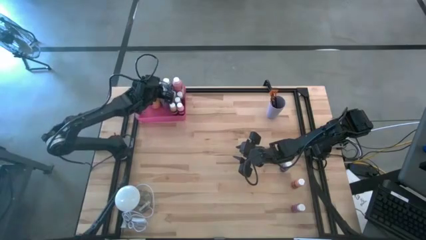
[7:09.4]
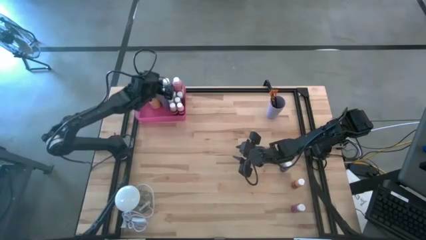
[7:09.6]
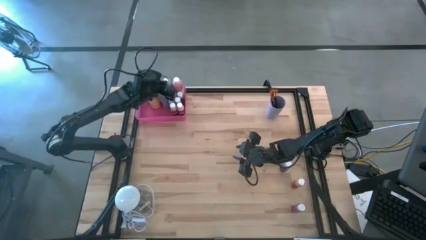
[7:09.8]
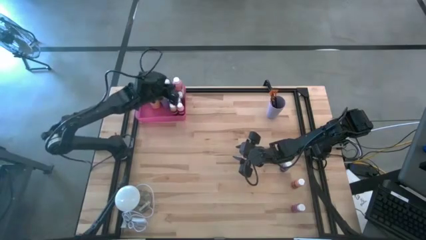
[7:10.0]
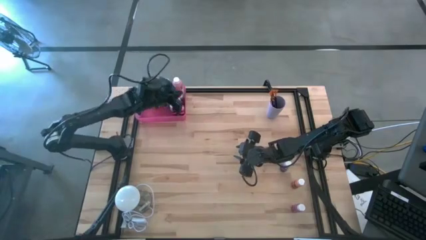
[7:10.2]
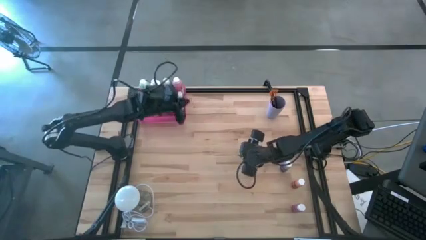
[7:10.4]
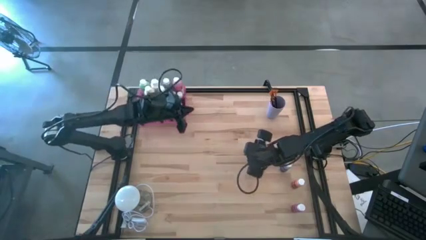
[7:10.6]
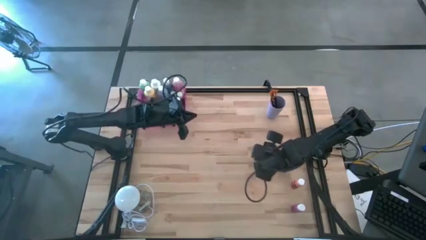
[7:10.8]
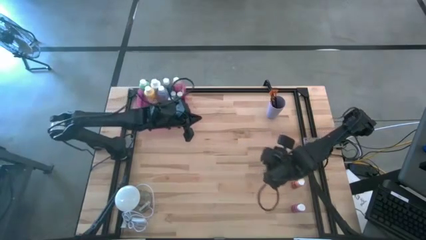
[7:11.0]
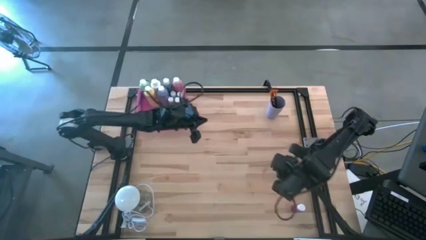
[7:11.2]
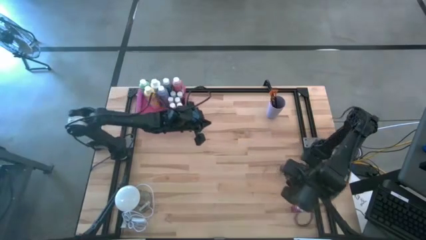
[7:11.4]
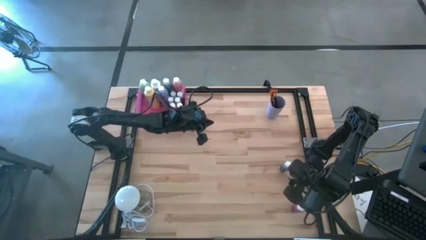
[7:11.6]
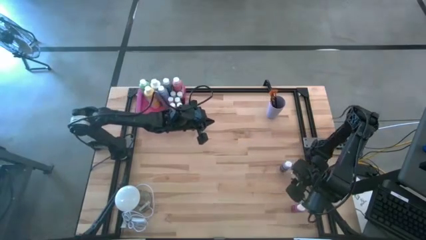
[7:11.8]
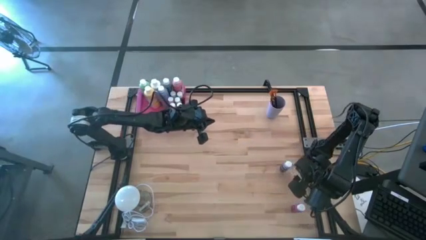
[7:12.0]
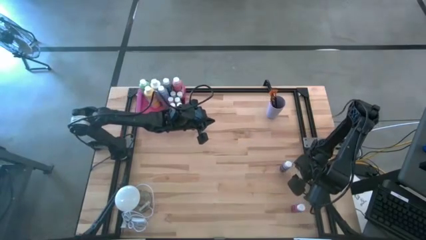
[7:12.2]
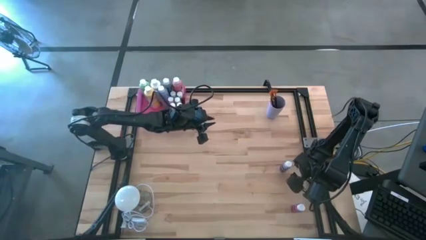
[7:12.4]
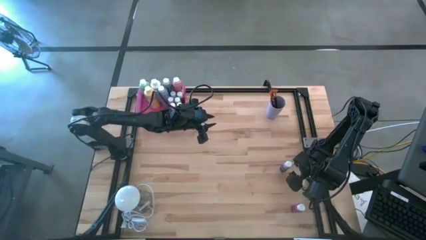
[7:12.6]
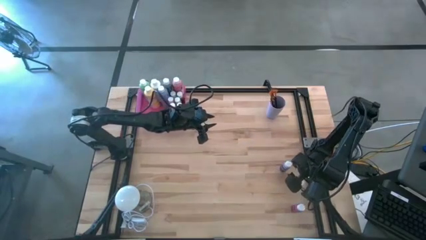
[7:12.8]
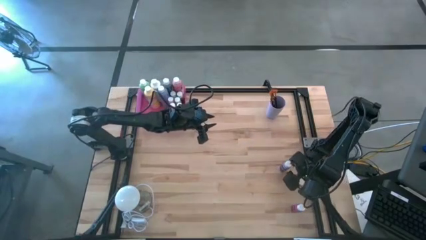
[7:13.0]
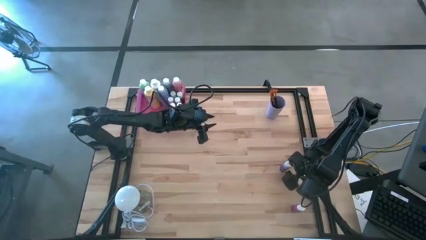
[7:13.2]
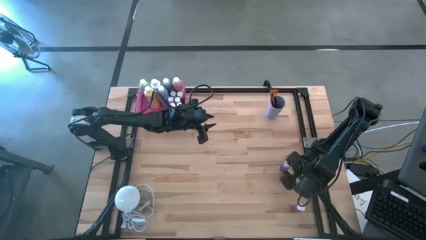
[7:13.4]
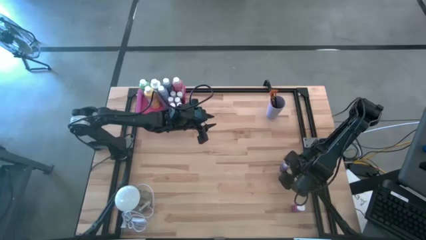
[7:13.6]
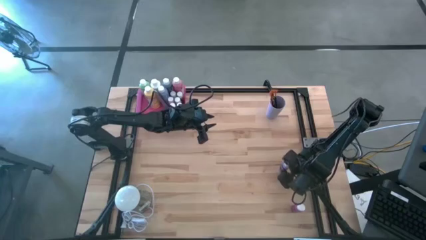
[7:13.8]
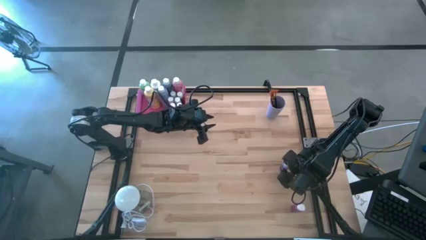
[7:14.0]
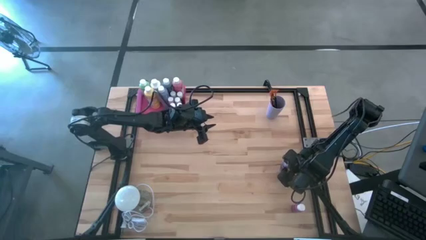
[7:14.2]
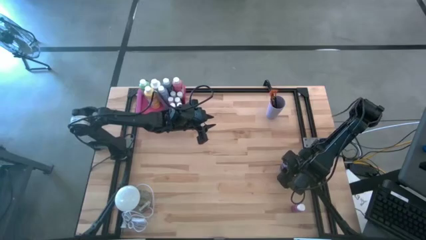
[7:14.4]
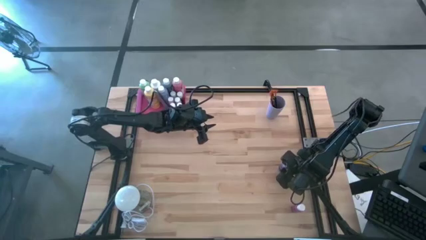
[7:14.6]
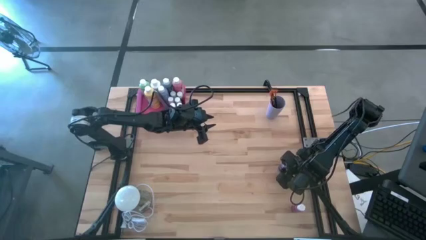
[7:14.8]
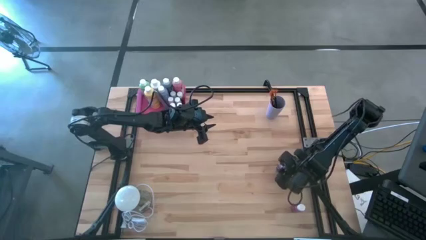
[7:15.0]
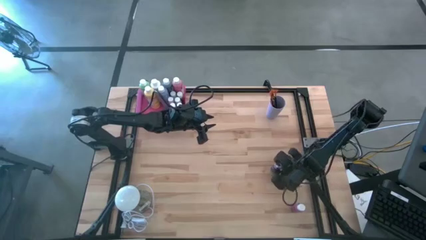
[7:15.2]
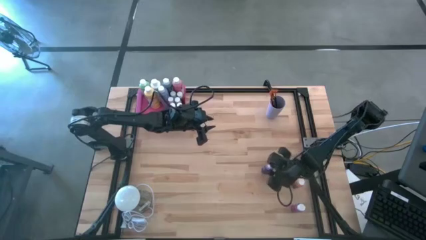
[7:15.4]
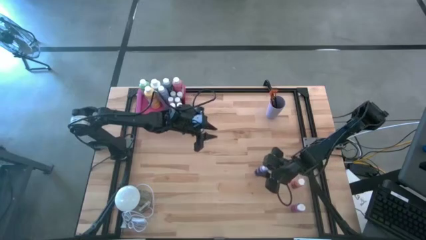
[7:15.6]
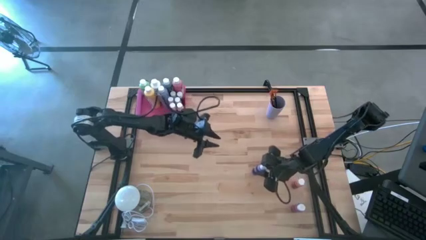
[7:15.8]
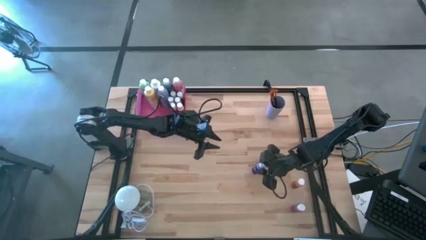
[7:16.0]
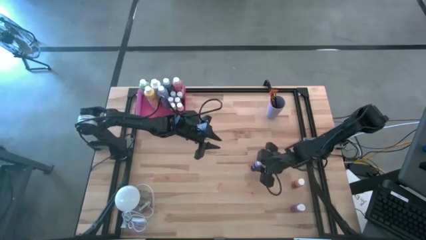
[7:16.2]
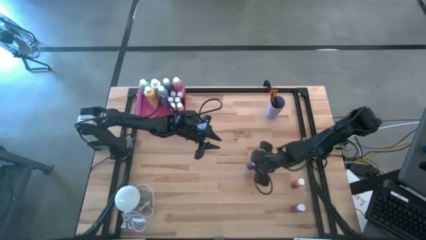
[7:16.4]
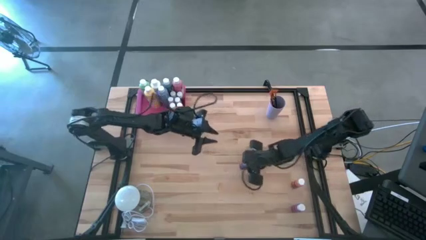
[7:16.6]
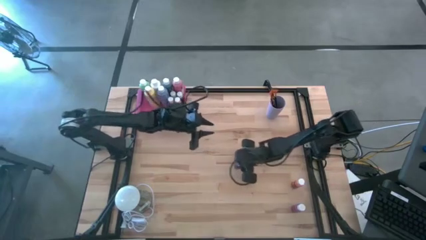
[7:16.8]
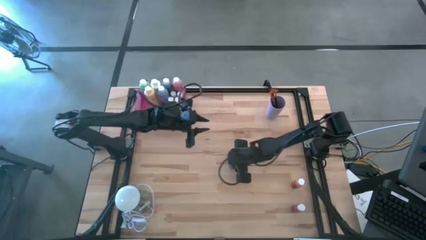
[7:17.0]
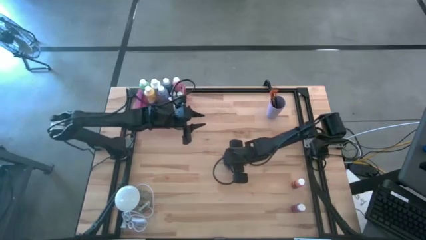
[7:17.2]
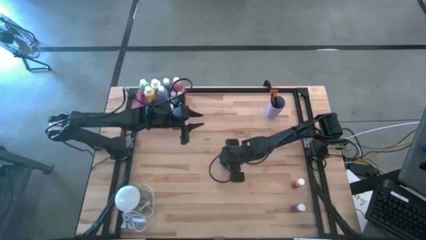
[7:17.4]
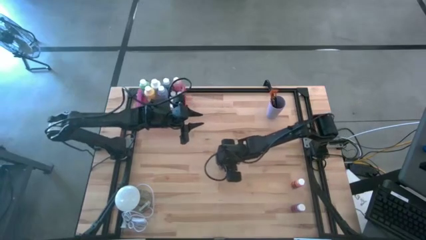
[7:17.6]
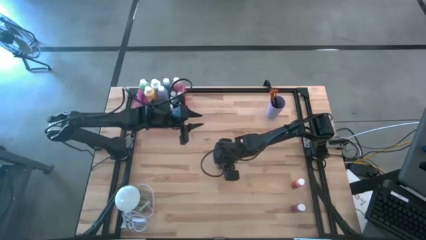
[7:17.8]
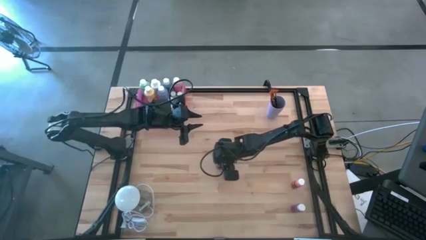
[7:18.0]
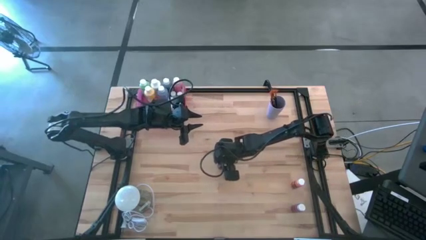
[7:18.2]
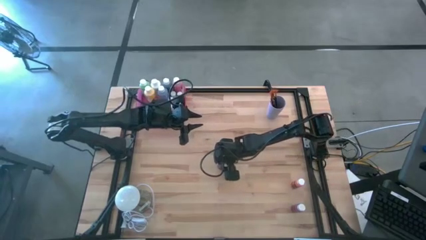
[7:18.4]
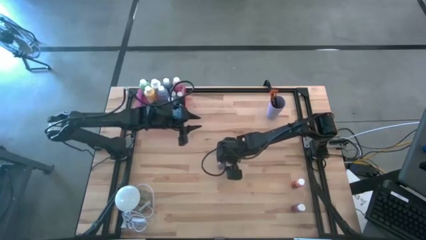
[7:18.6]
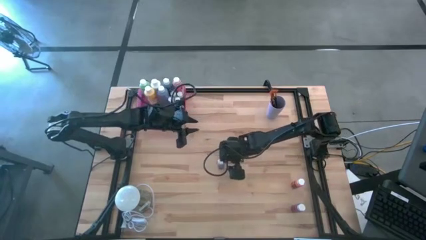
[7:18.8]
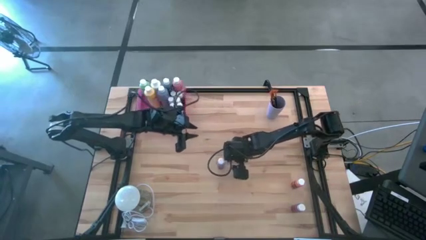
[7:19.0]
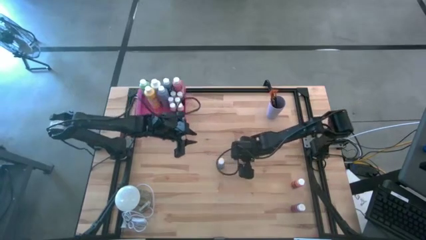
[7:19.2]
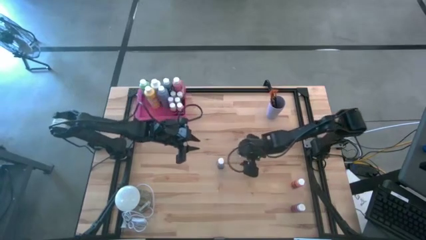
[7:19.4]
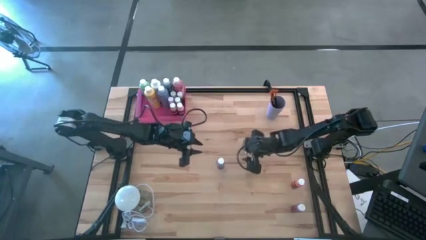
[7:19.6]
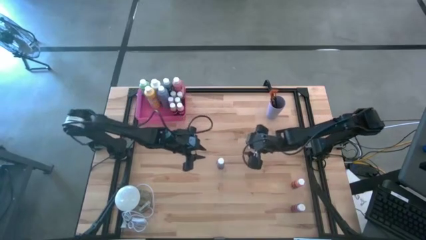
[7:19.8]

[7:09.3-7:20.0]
Task: Pick & Place Paint Supplies
Put the small blue paint bottle into the pink bin
